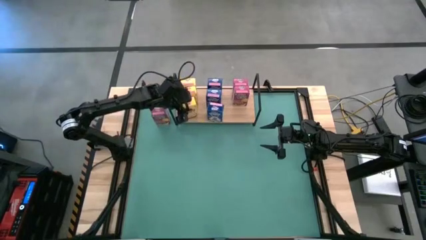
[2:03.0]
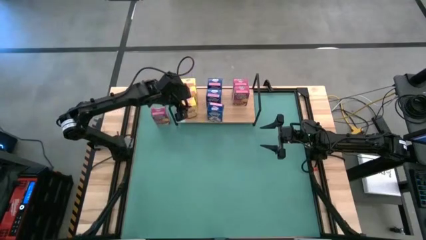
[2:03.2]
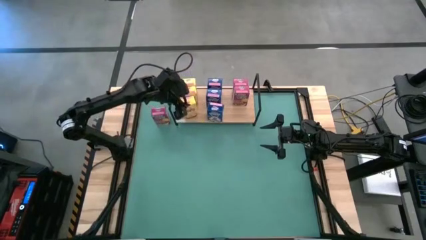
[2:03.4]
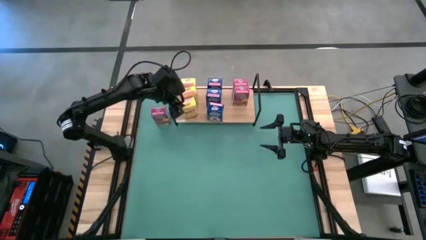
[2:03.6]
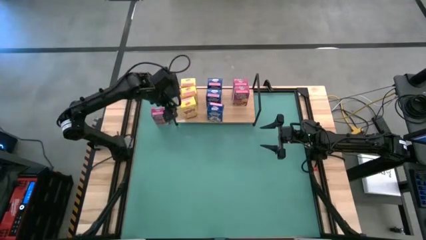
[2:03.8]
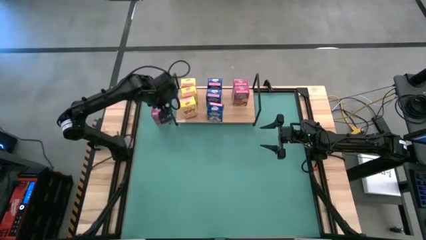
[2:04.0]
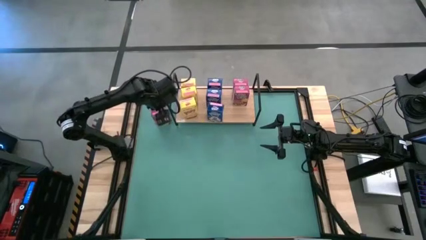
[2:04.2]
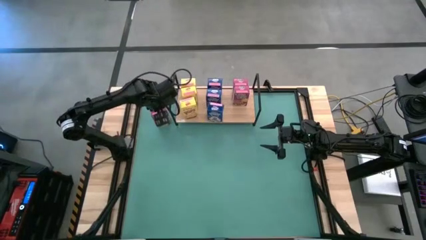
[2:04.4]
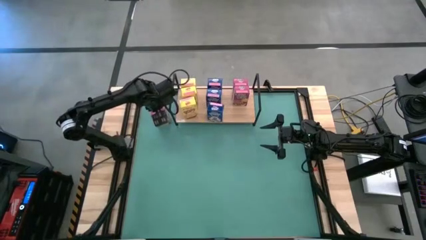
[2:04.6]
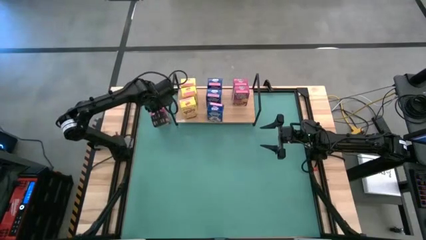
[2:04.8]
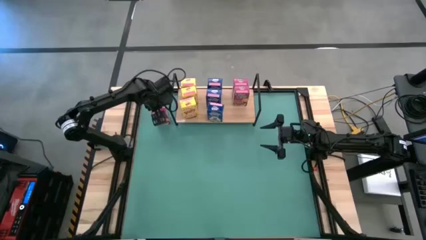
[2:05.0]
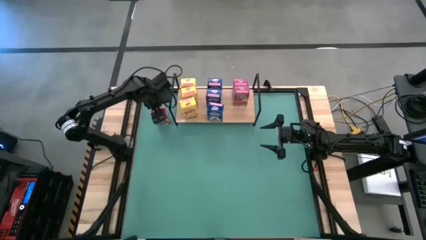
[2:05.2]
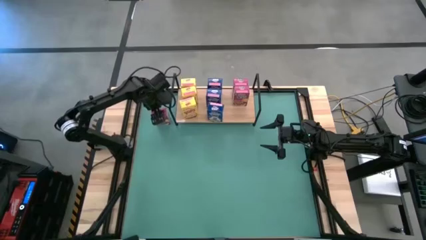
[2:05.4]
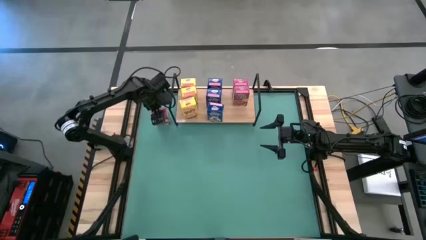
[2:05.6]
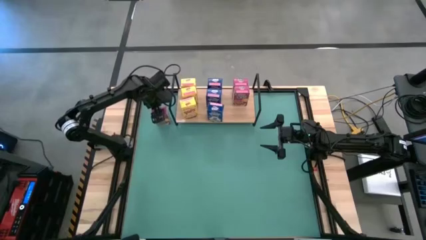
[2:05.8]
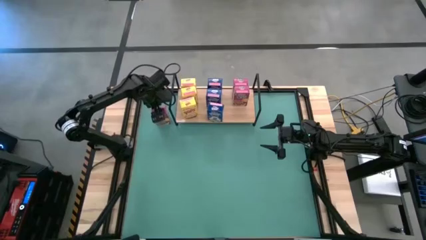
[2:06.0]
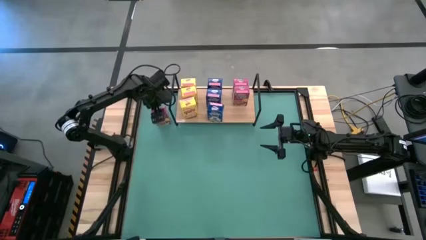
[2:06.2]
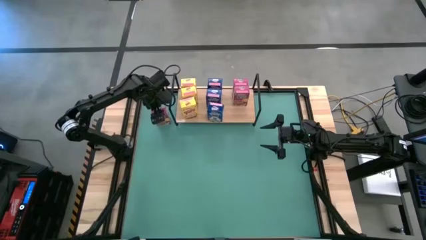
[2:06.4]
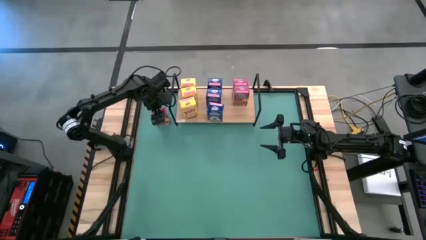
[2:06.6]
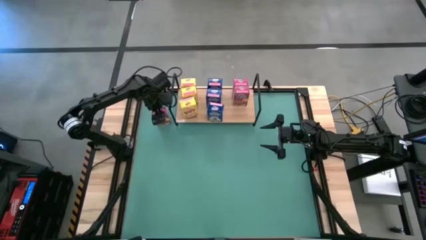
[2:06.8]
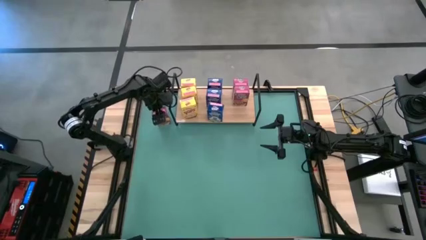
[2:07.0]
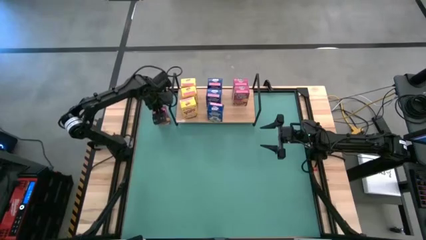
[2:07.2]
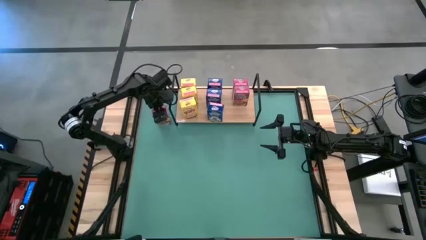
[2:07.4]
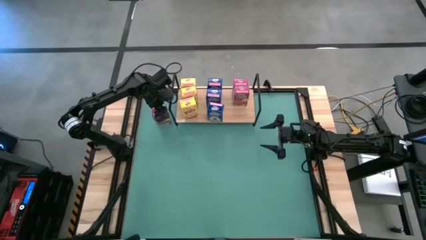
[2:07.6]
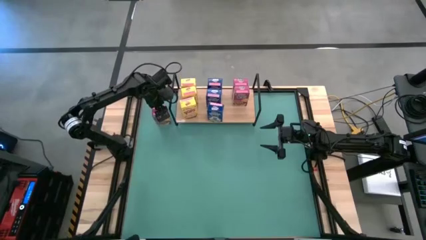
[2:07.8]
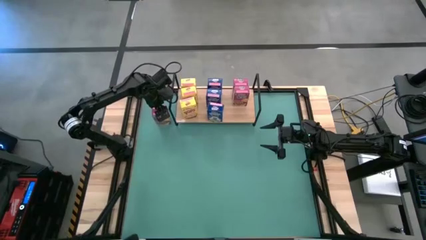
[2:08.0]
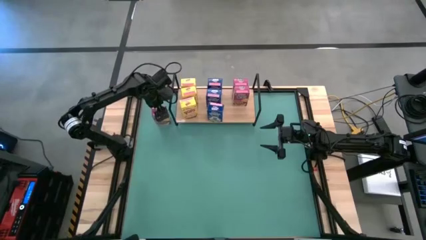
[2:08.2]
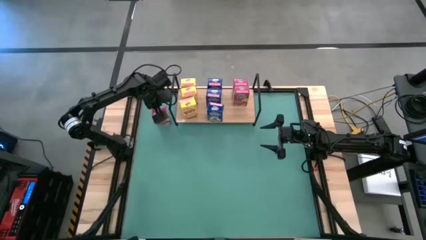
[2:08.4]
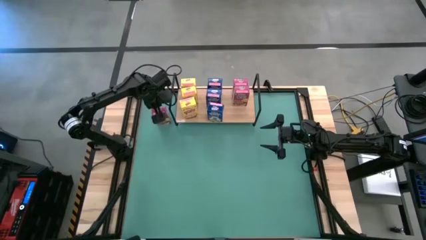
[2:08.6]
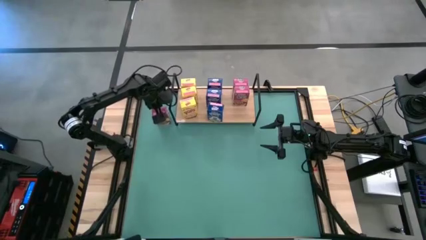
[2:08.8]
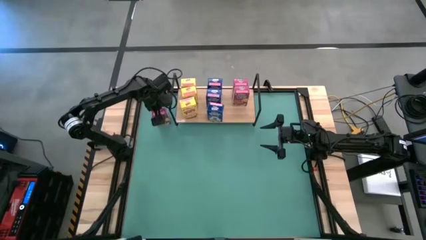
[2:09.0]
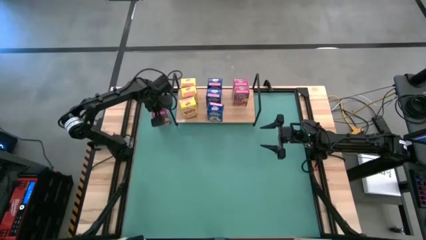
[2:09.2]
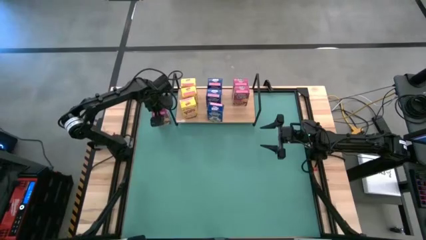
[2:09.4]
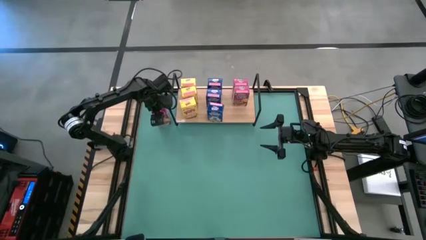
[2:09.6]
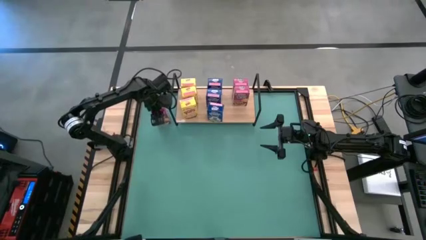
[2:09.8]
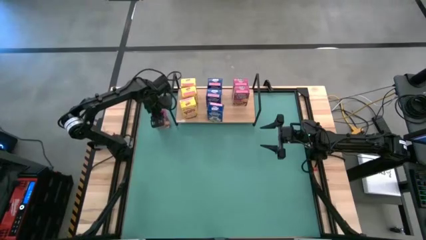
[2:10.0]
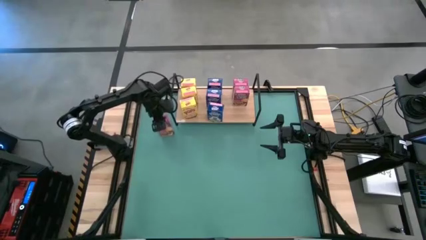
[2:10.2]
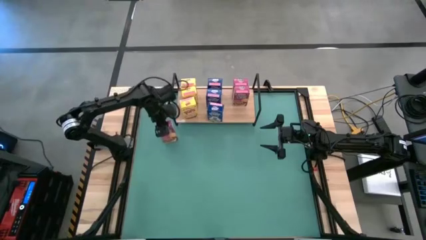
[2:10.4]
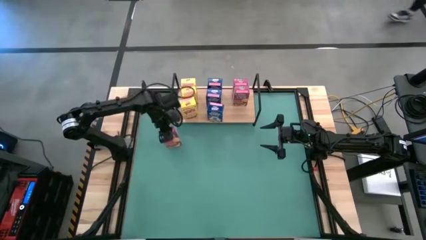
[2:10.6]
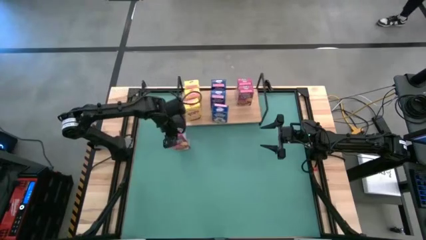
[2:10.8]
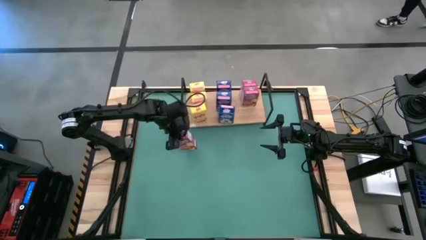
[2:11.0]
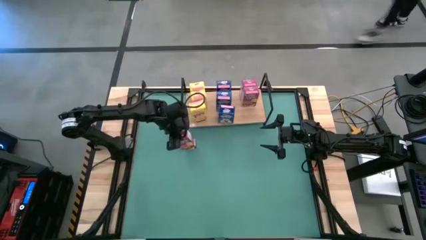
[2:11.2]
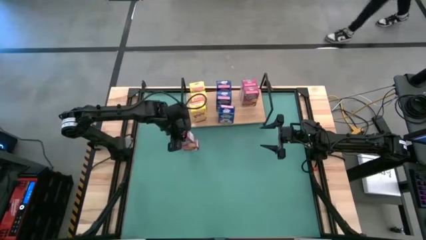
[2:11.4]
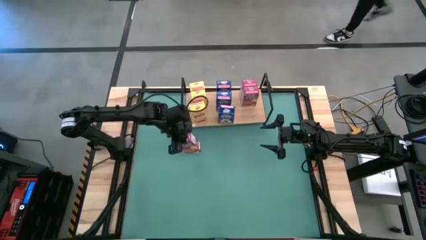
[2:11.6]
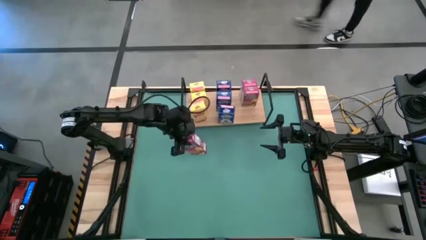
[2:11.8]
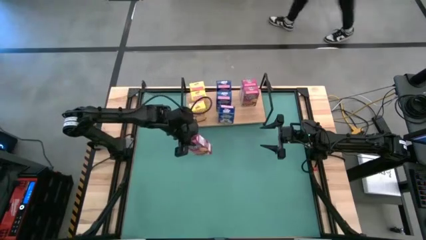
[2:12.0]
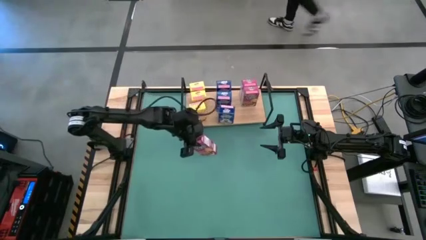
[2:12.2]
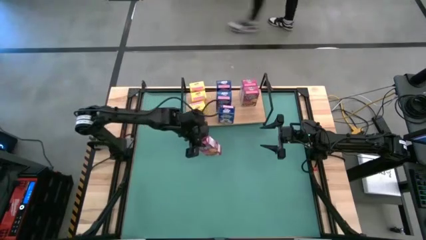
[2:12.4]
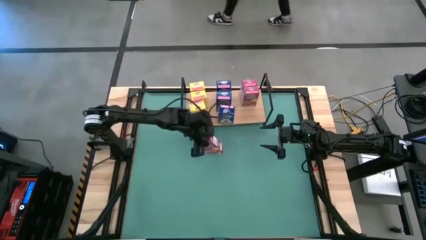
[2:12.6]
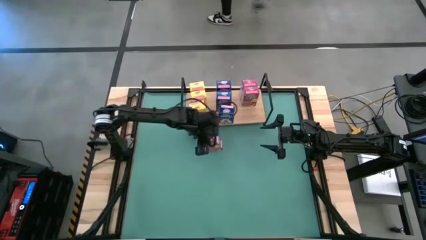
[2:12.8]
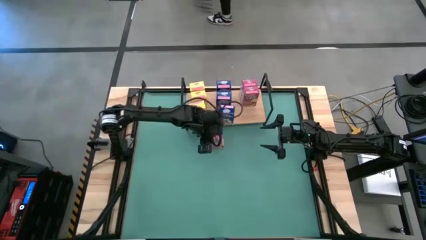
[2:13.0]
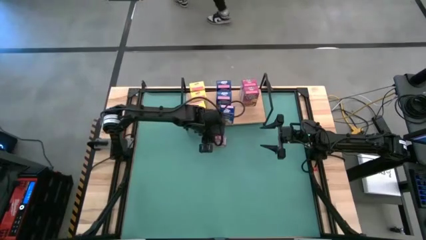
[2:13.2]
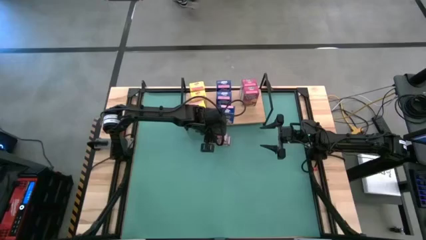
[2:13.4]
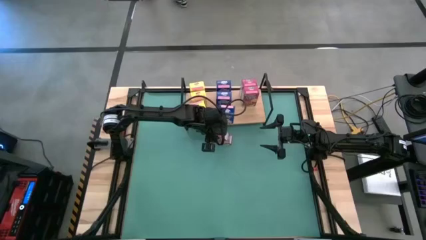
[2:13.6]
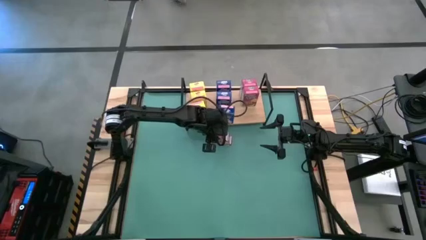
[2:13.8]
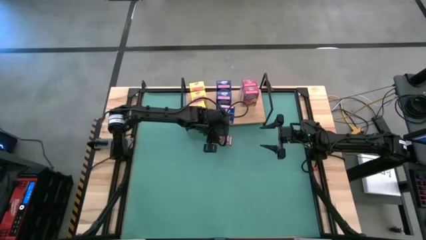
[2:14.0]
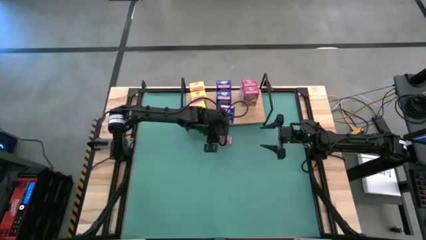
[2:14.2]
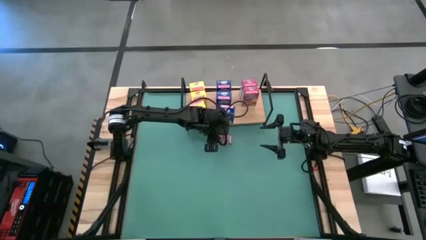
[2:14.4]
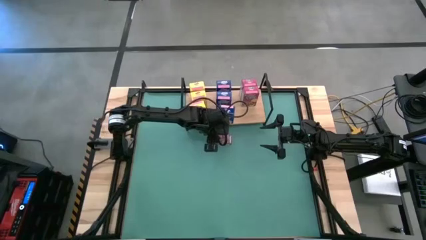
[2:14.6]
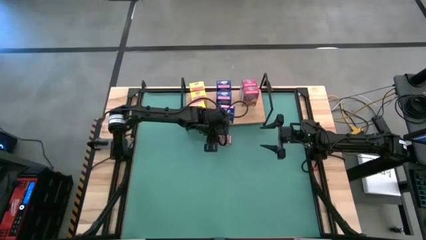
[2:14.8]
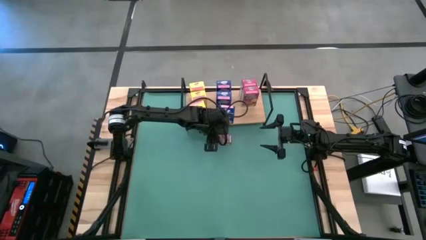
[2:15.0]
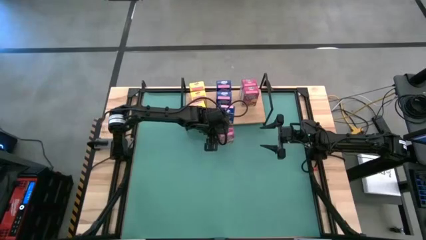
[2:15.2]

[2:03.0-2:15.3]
Task: Stack cereal on shelf
Move the pink cereal box to the front of the shelf

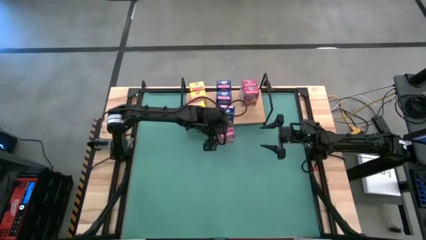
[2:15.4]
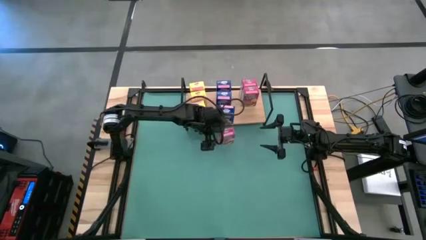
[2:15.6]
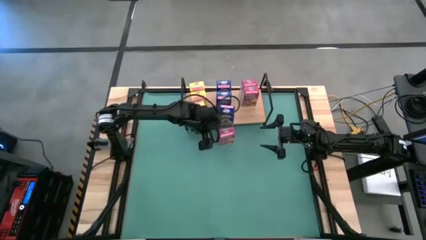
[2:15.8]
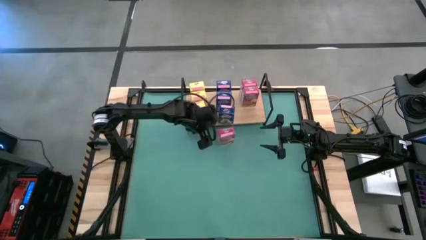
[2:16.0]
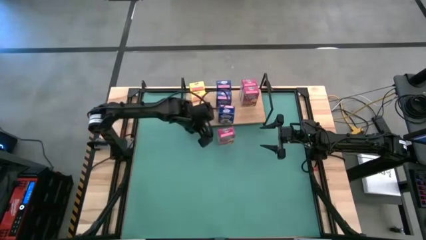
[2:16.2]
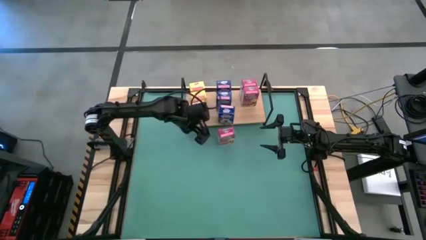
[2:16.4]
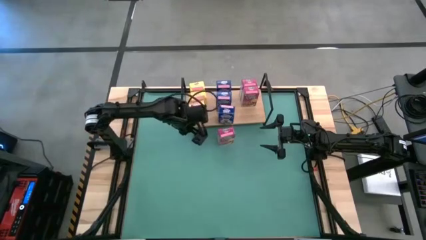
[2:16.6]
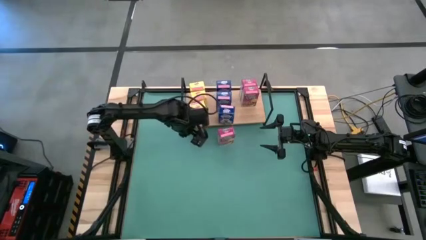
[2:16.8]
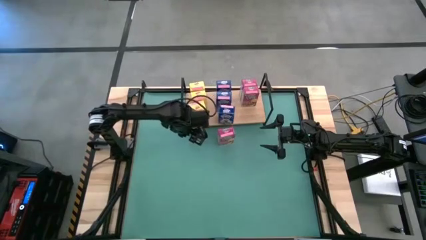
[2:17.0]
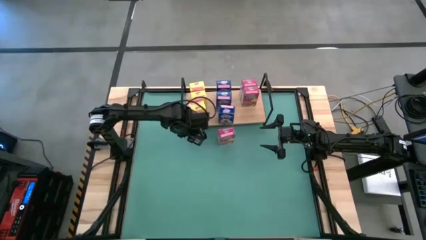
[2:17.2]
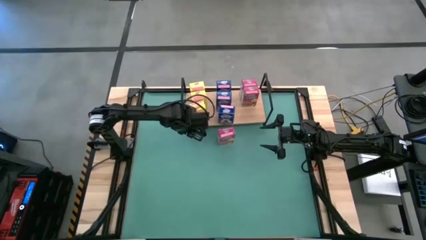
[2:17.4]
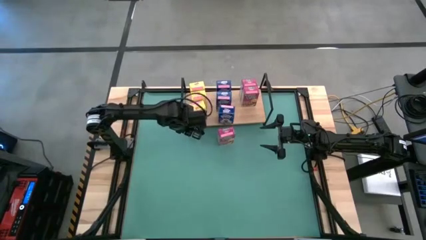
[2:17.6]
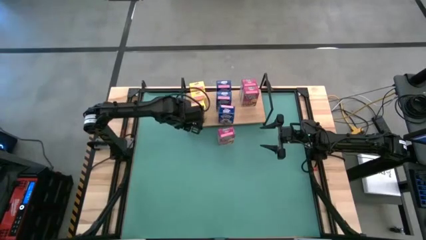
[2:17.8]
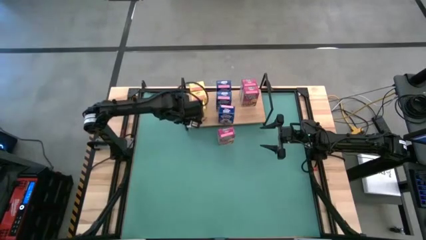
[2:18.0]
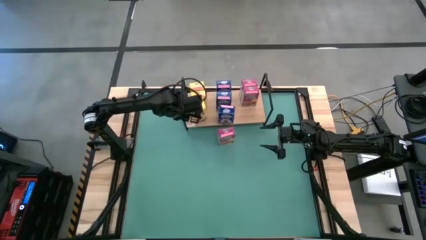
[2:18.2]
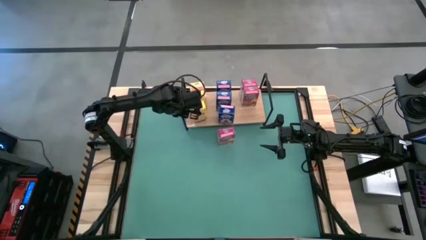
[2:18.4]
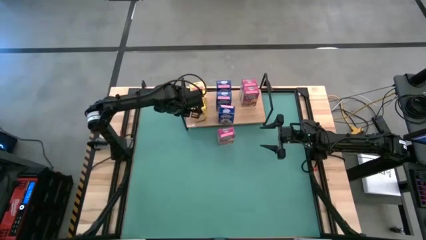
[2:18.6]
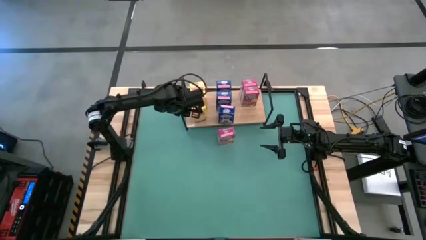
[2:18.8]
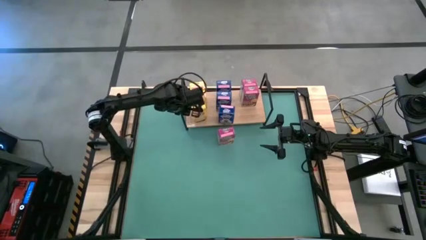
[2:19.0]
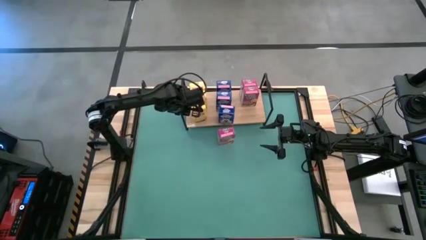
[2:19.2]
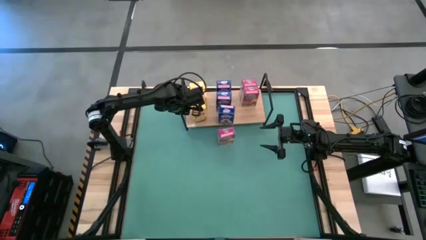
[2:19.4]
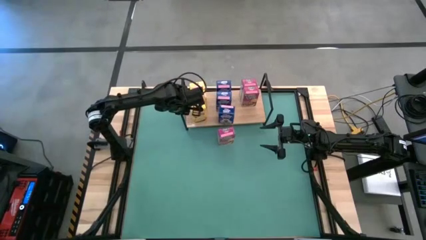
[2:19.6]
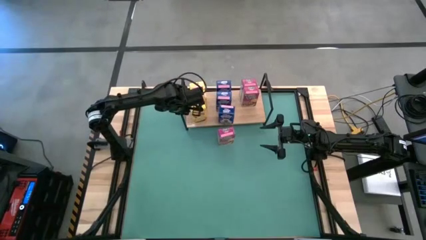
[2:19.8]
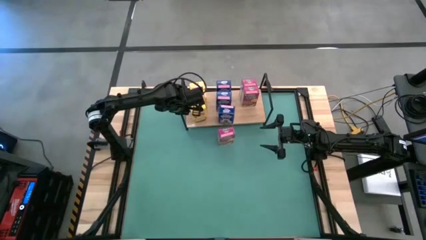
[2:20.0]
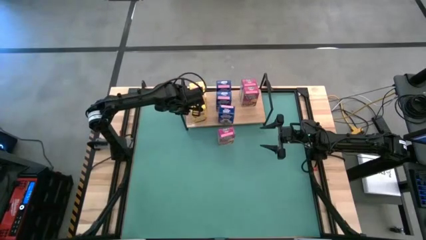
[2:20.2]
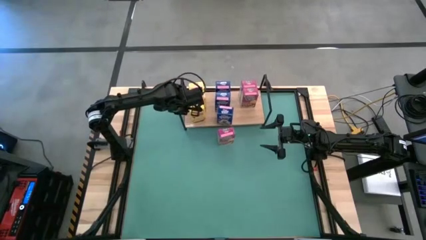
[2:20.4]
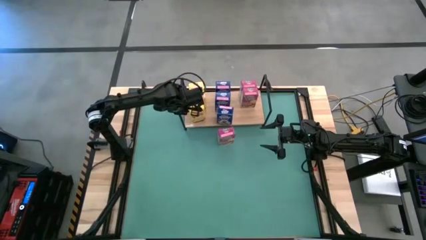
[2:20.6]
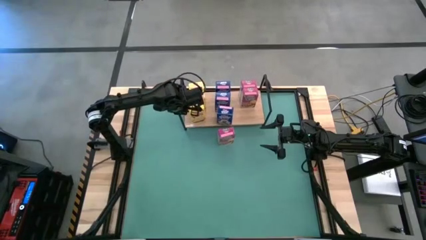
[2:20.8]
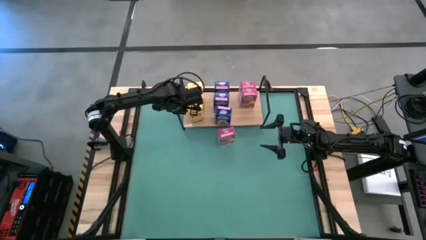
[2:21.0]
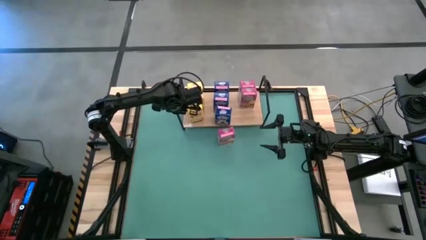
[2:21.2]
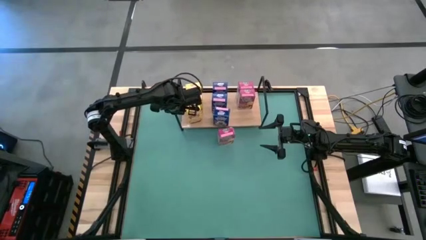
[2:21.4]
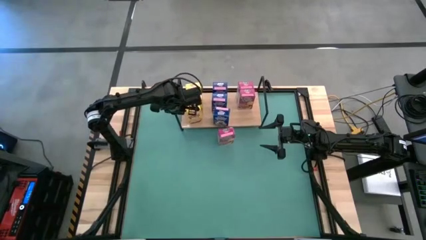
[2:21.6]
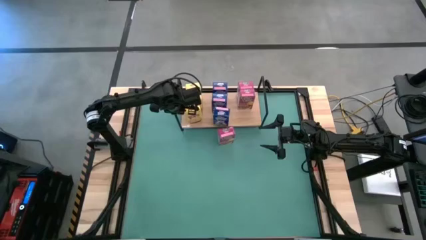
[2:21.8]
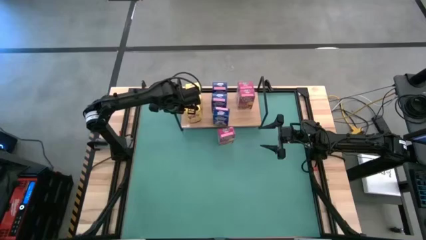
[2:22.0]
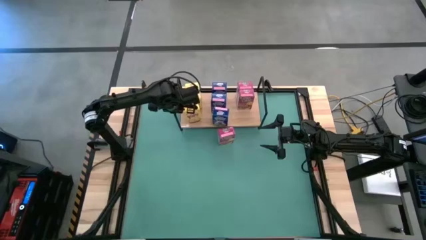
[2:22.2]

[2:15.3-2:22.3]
Adjust the shelf
